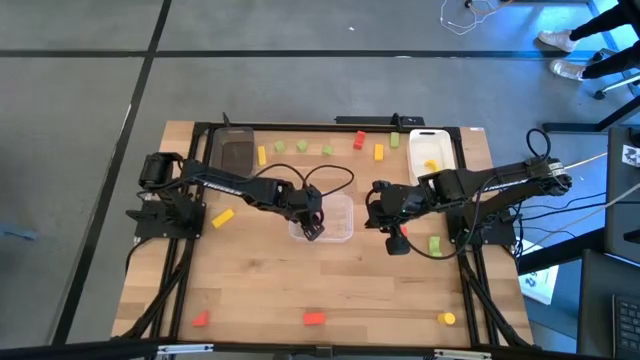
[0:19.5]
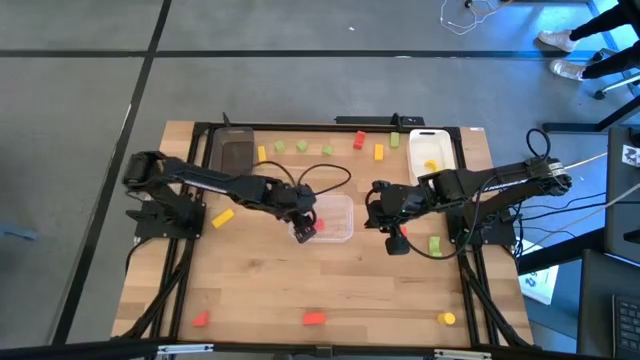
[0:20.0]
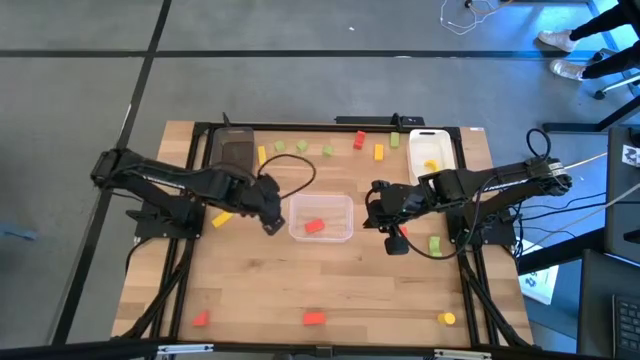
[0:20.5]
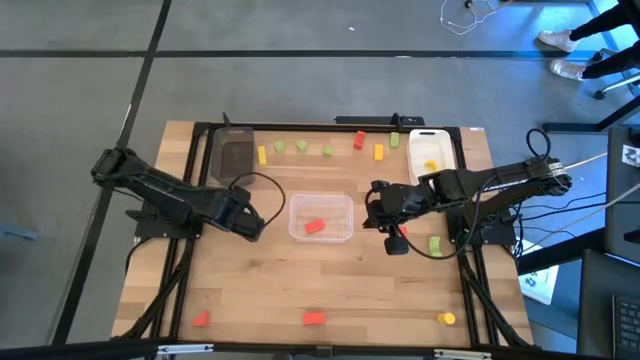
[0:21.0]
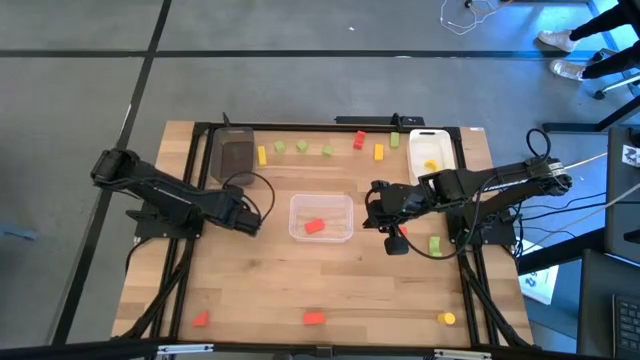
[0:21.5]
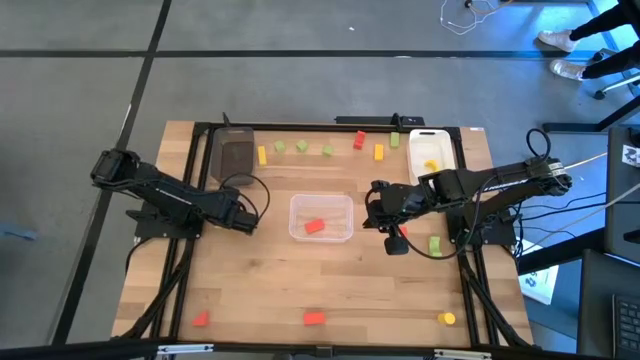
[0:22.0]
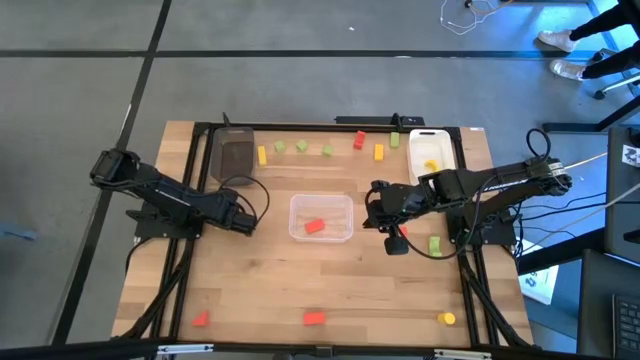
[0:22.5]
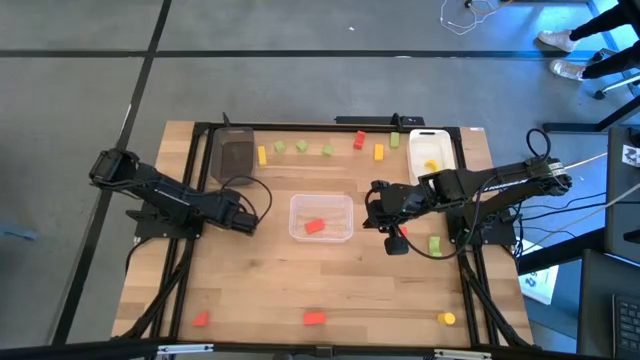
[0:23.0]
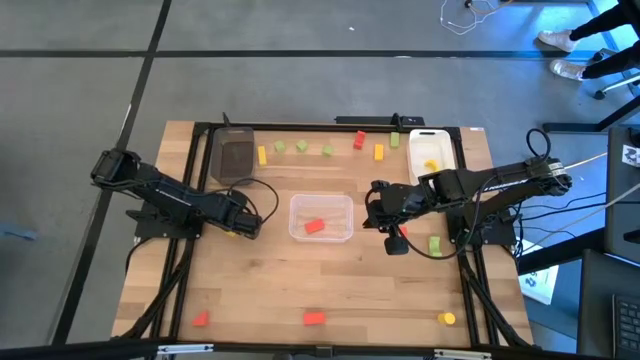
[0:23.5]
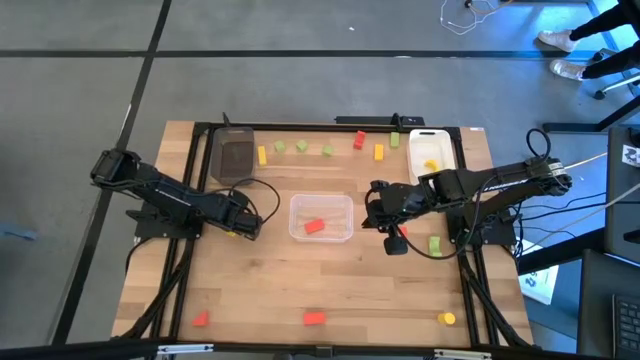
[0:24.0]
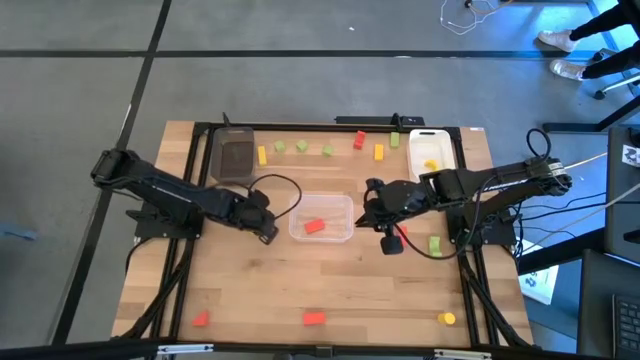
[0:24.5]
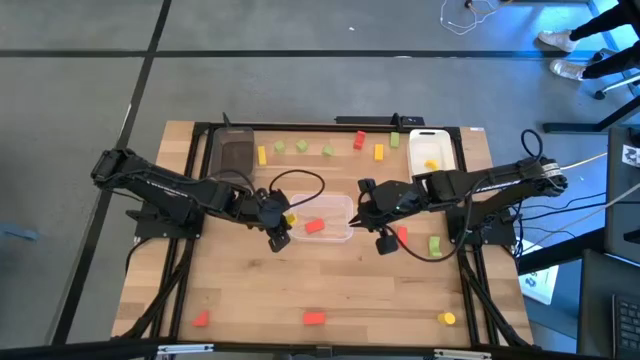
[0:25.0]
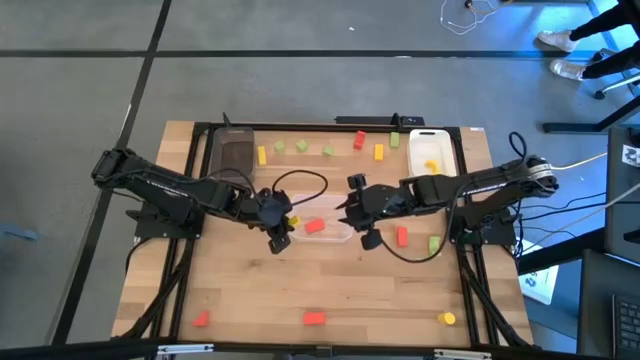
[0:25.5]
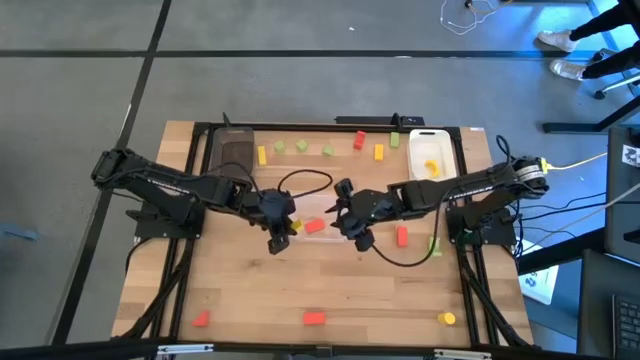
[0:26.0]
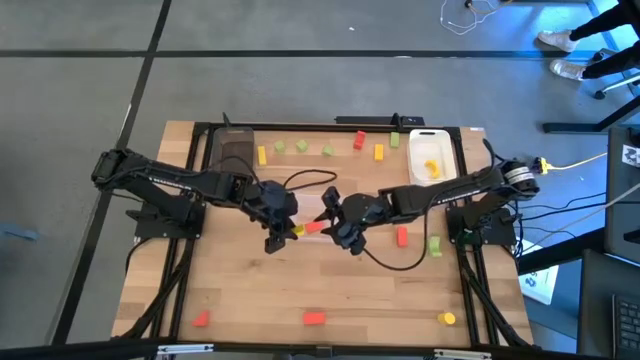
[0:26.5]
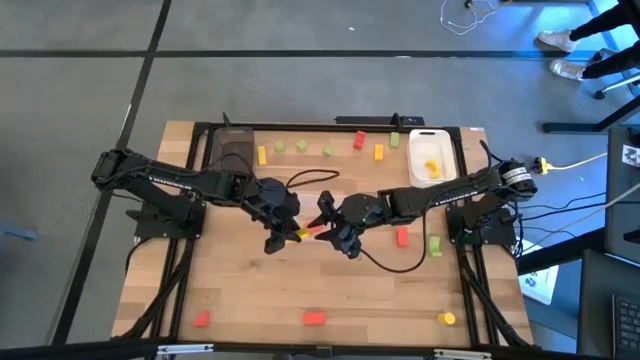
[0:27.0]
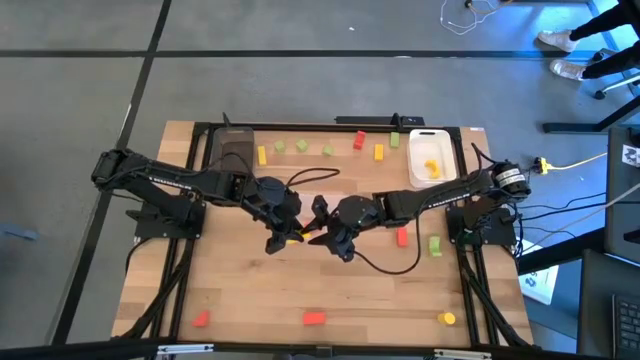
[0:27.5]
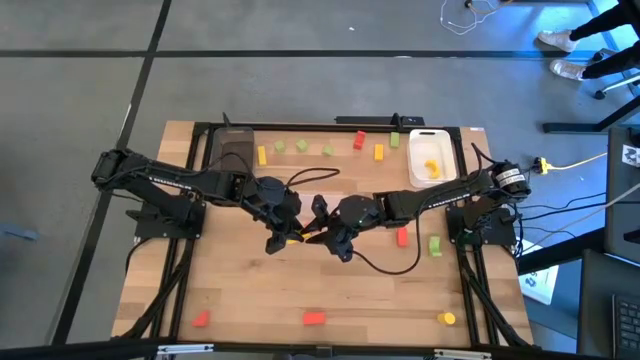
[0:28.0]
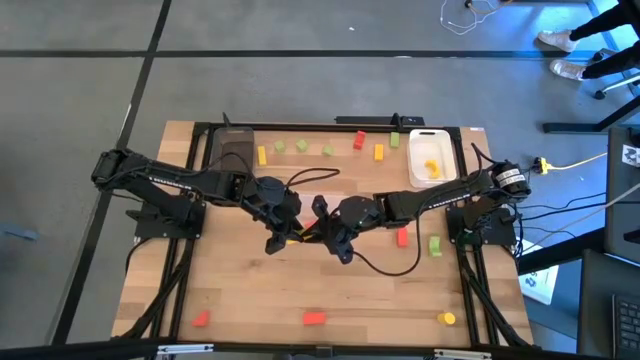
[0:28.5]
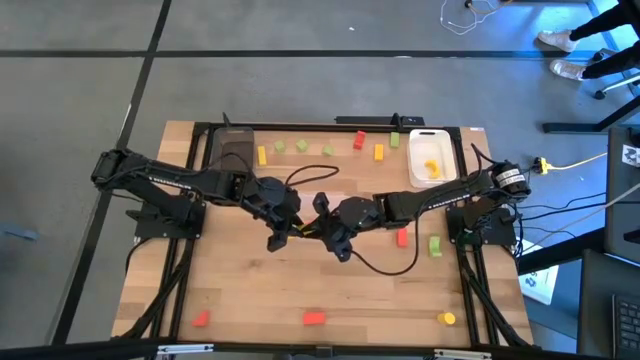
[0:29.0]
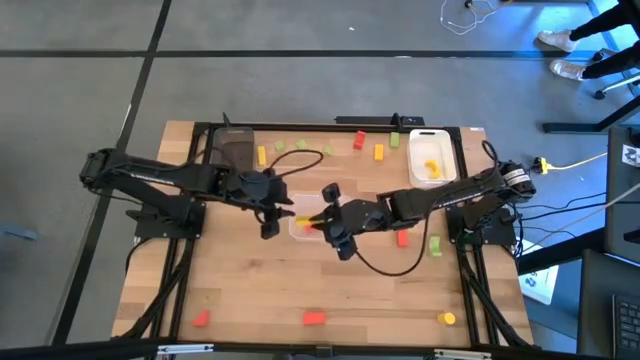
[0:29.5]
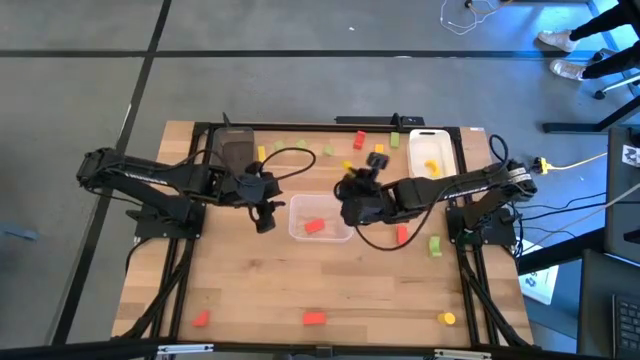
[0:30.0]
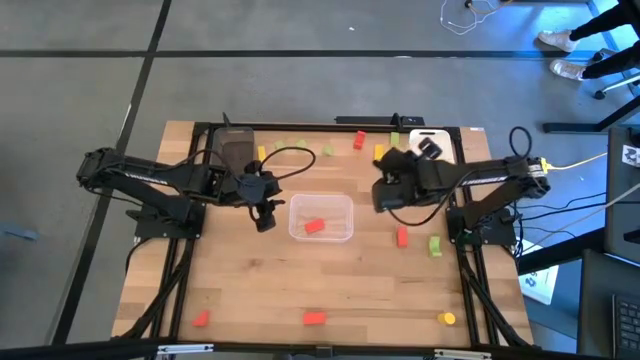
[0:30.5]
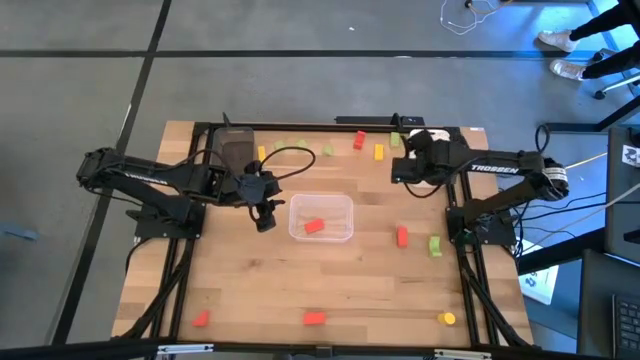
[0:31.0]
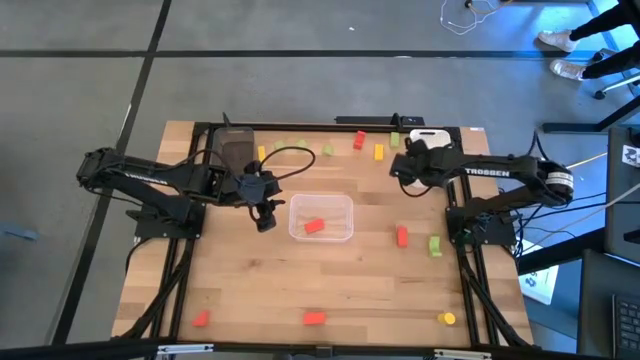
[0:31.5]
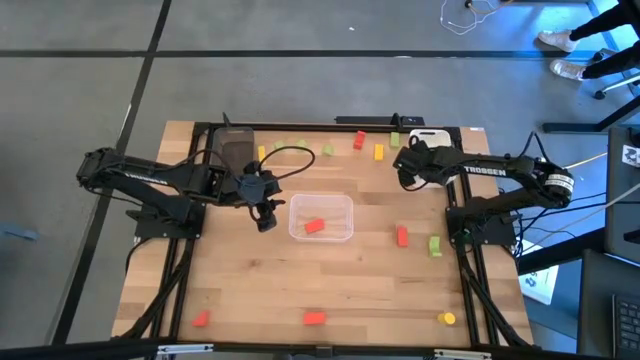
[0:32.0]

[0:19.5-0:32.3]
Task: Sort & place blocks by color
Put the yellow block into the white bin

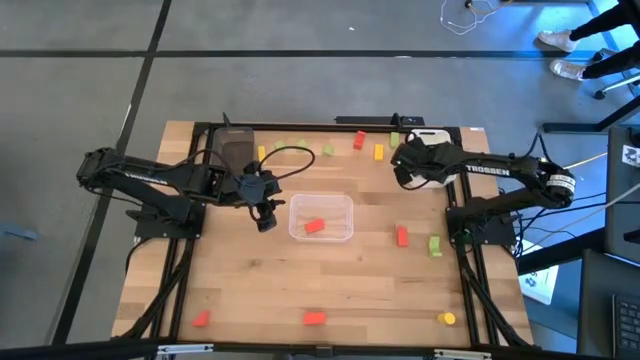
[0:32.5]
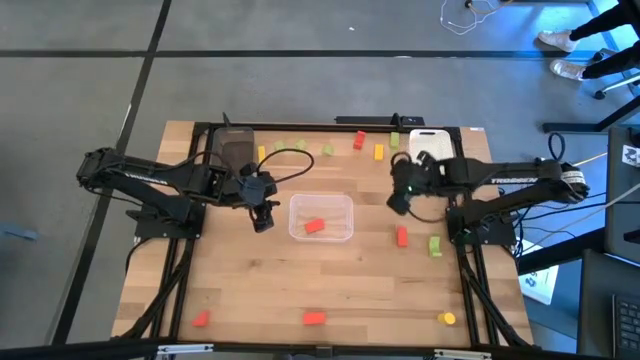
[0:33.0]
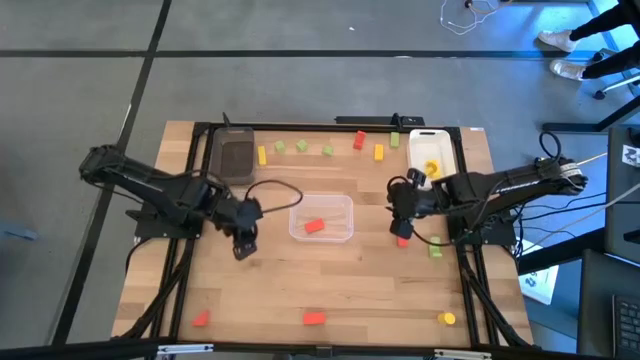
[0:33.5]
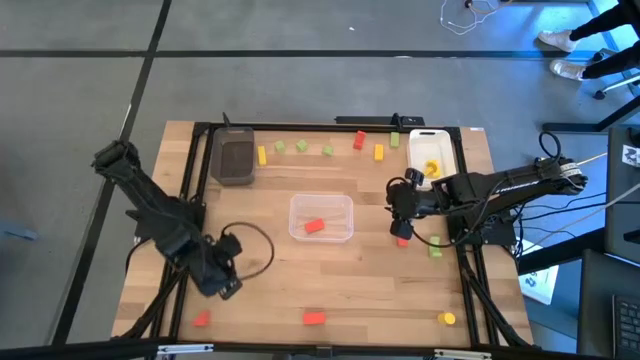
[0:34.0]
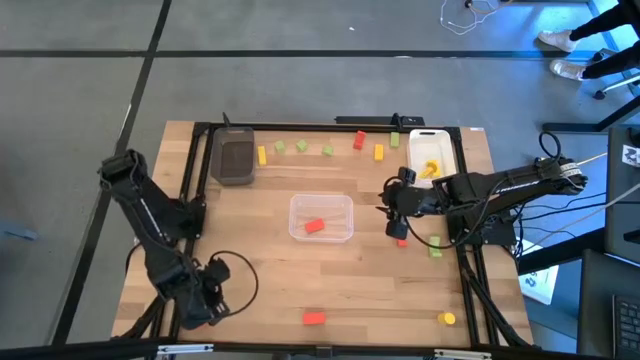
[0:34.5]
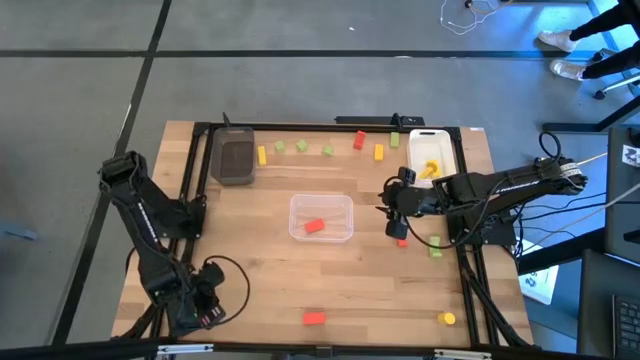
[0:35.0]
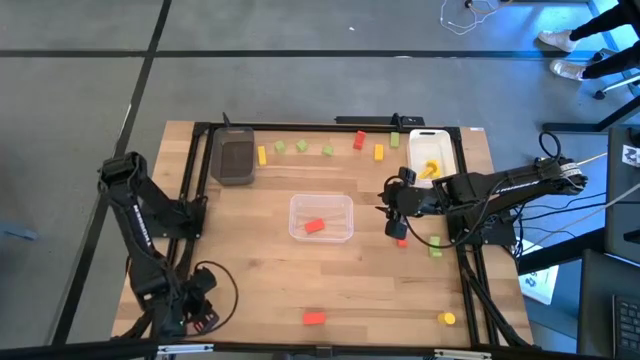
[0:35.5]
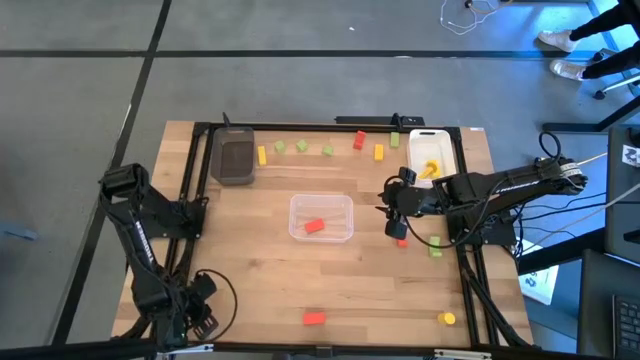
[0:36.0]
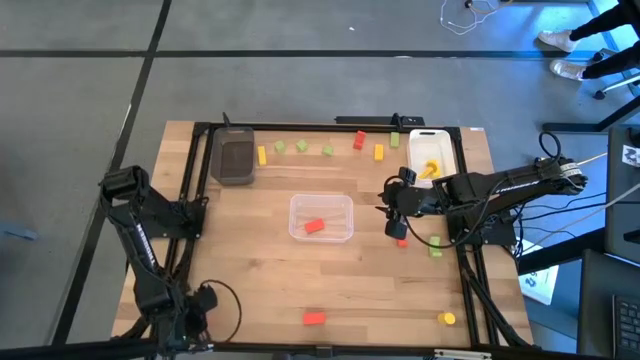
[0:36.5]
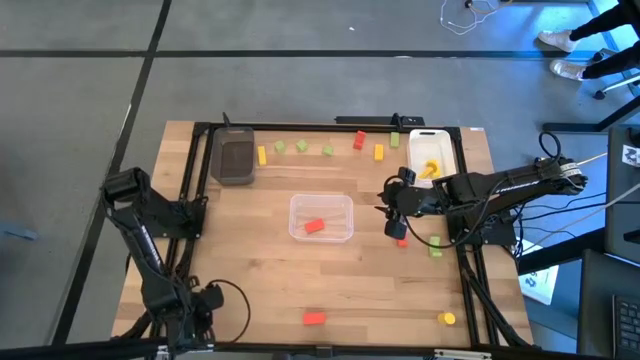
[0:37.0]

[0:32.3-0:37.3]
Put the orange block into the transparent bin

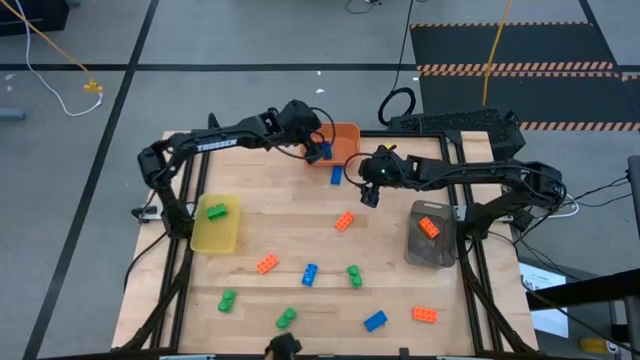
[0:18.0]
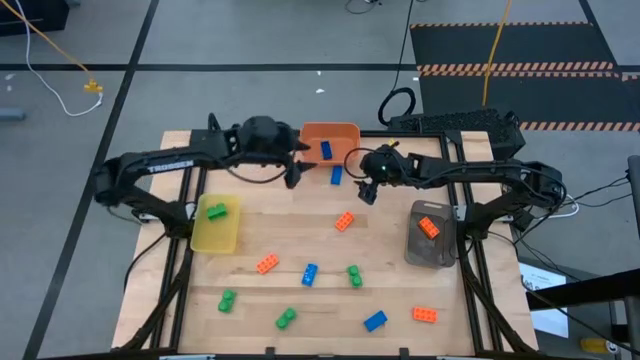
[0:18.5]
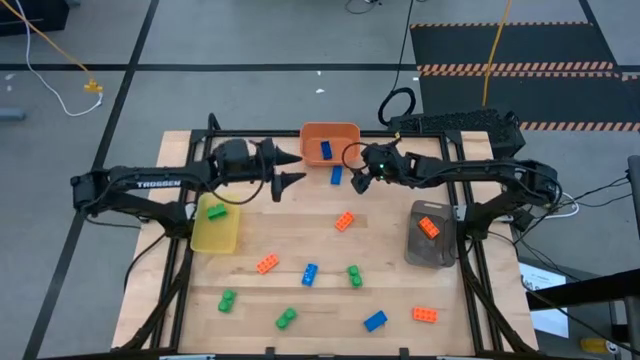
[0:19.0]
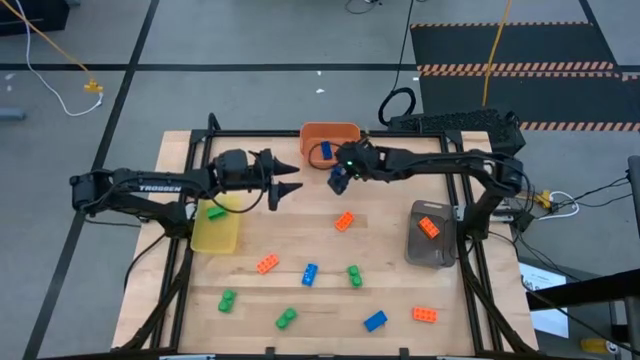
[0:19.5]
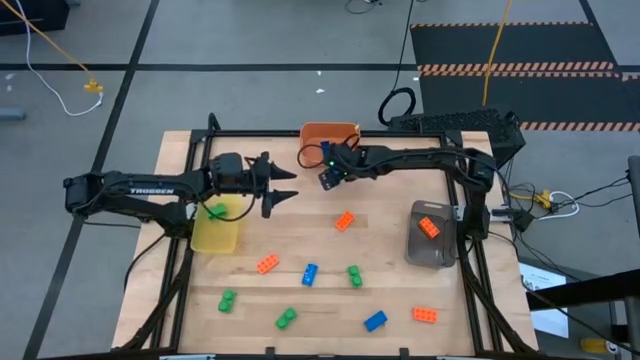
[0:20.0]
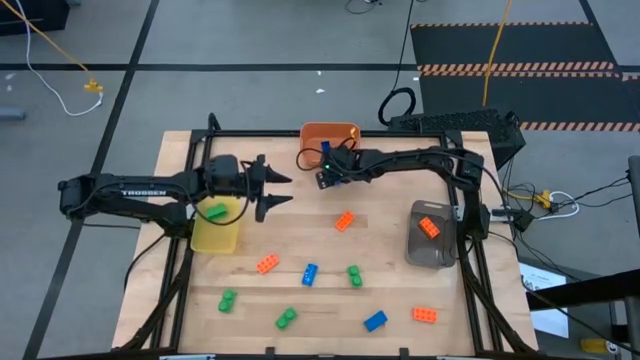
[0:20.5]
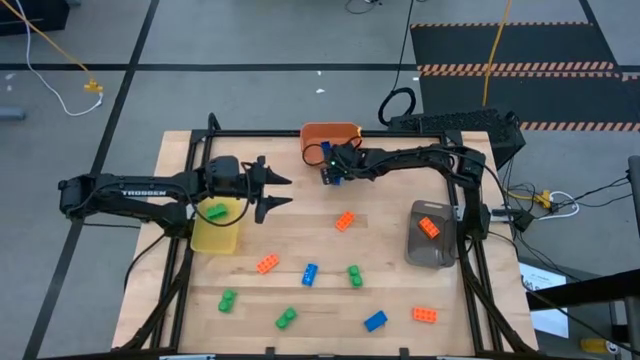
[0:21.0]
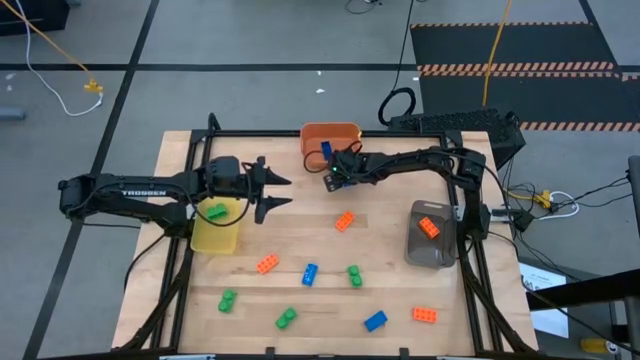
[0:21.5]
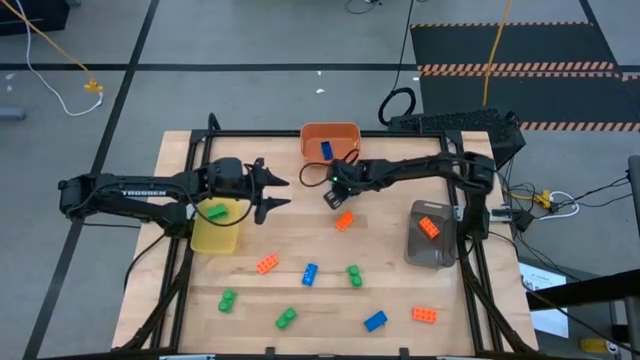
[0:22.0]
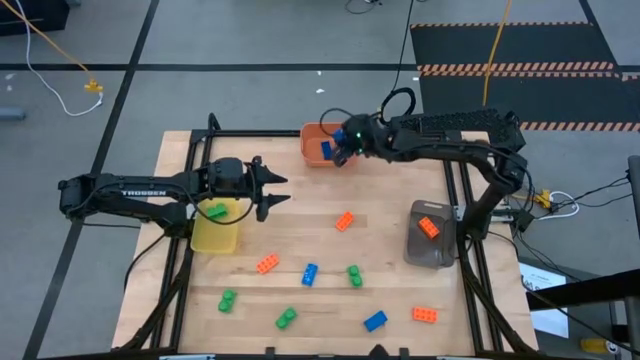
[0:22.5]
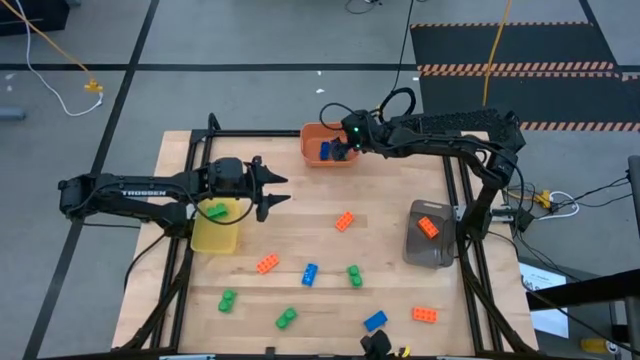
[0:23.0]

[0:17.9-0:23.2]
Task: Sort & place blocks by color
Put the blue game piece into the orange bin
